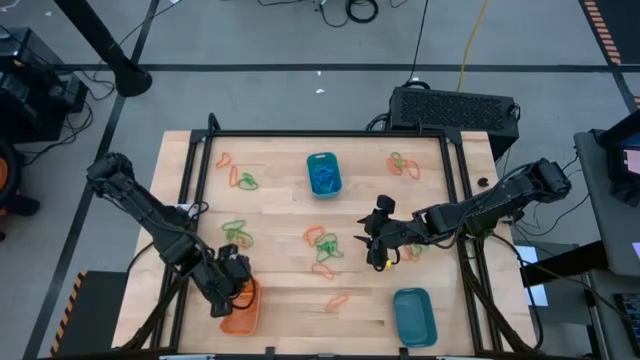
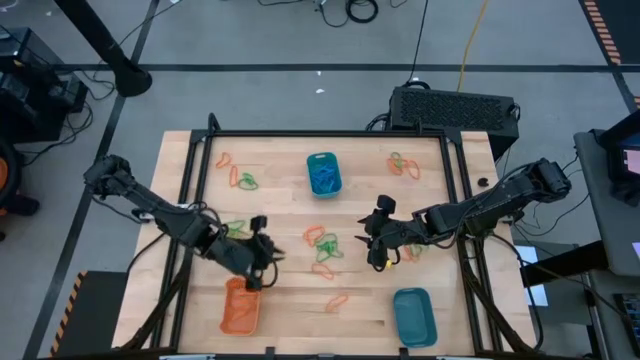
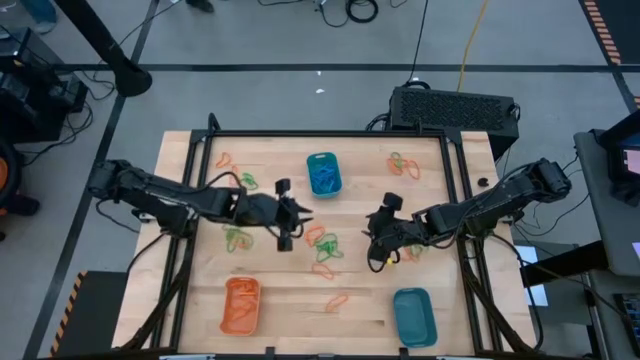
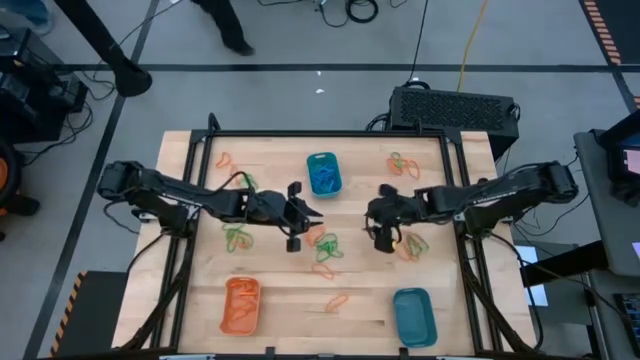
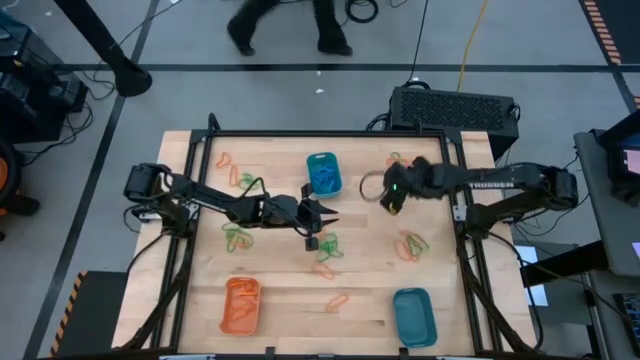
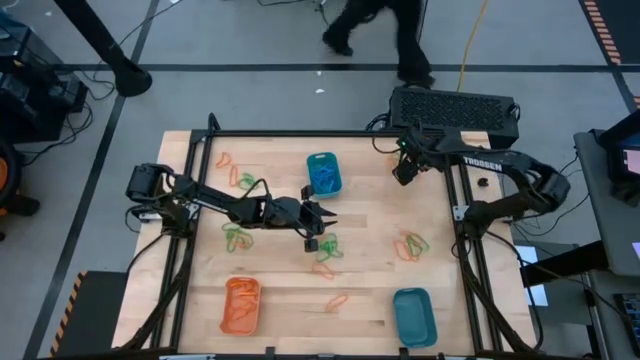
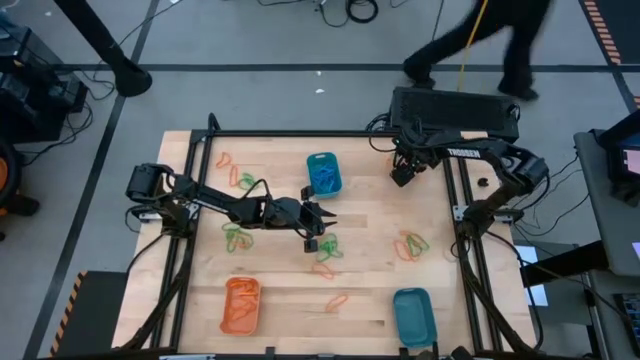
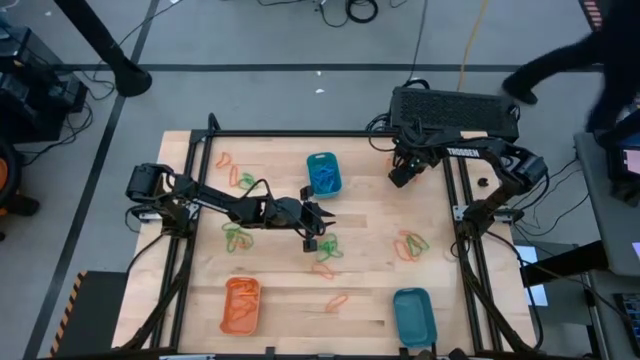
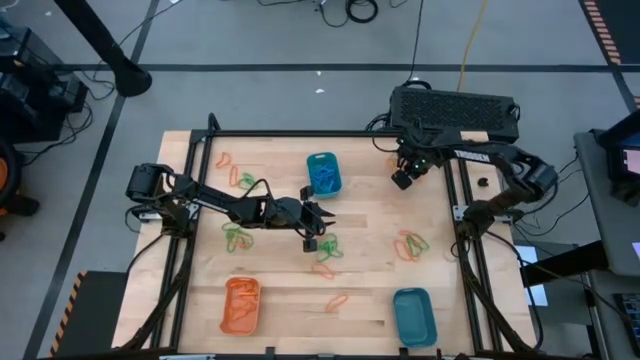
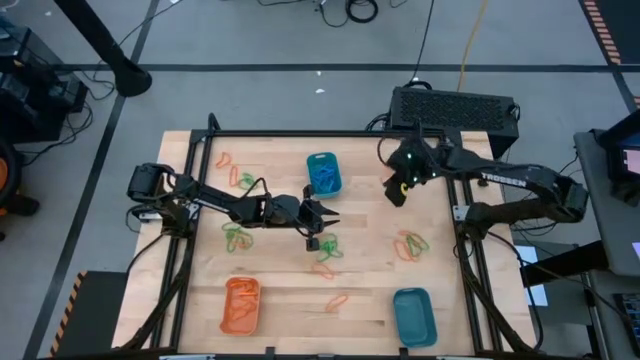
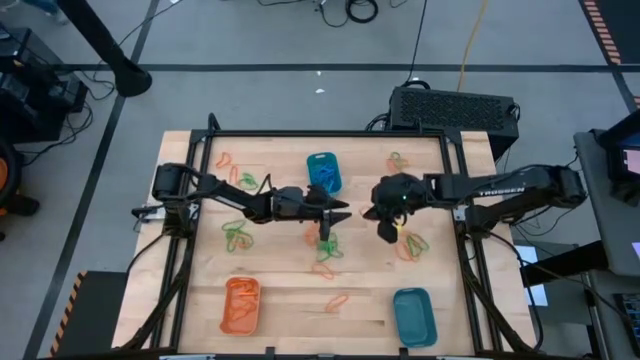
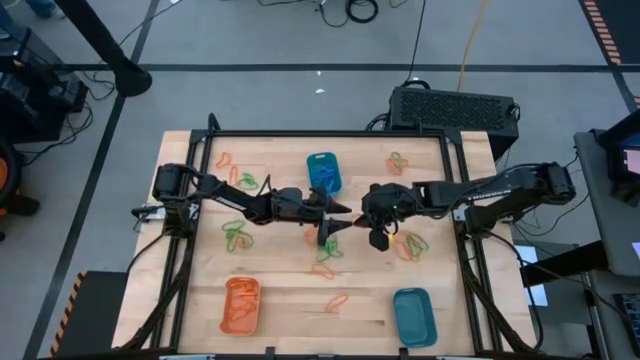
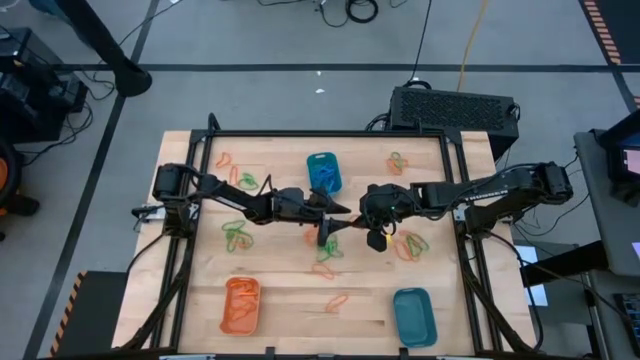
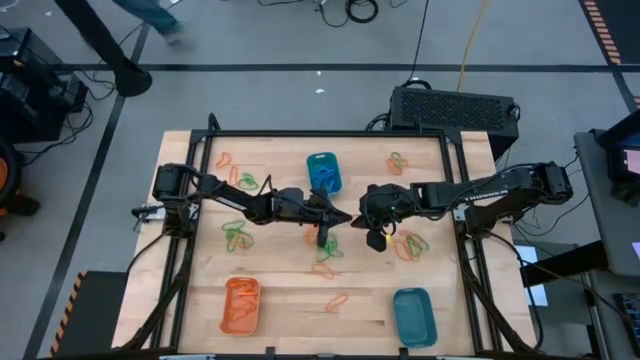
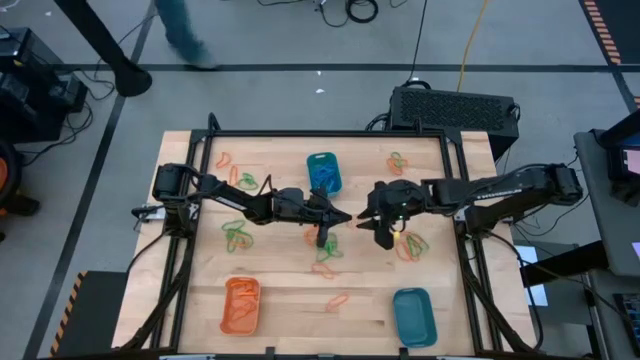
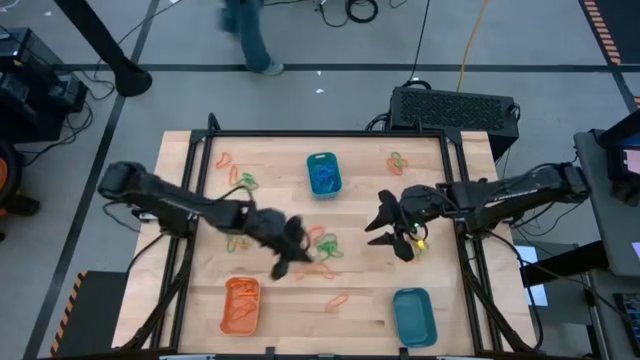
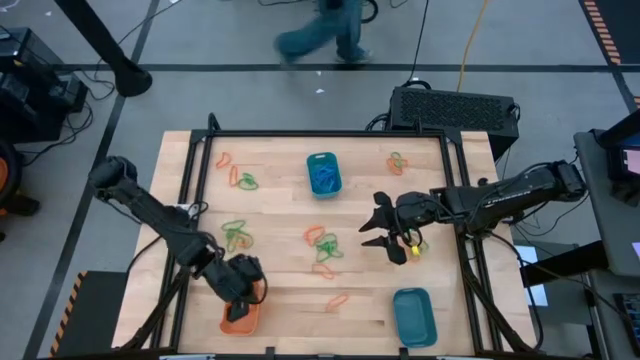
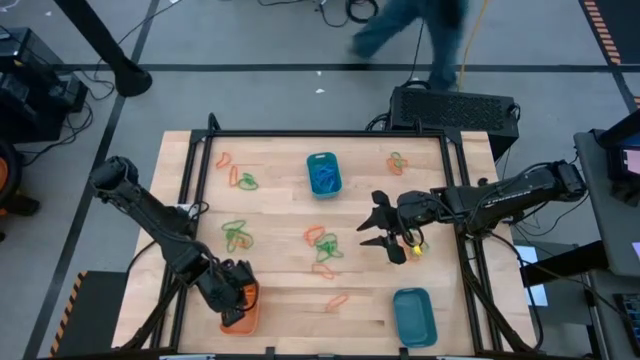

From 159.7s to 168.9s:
Task: Sort rubber bands into baskets
Put the orange rubber band into the orange bin

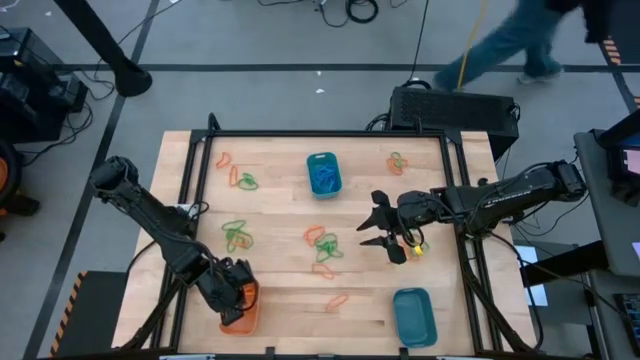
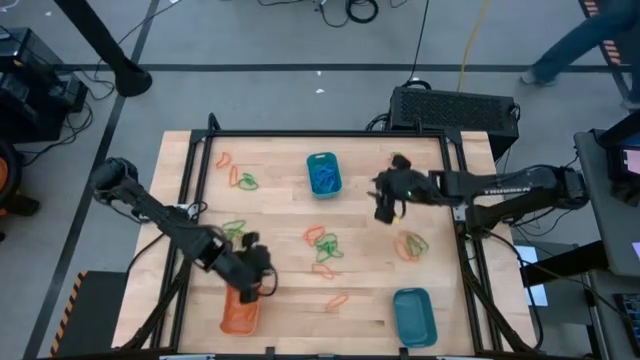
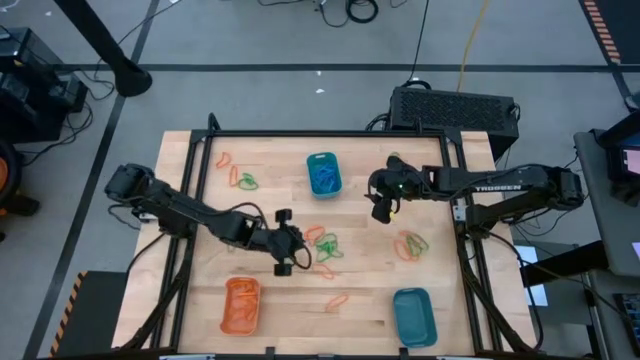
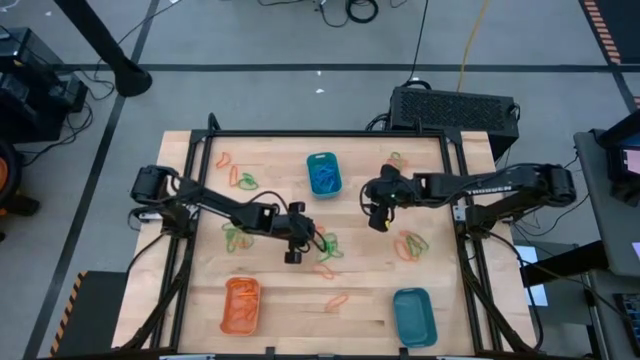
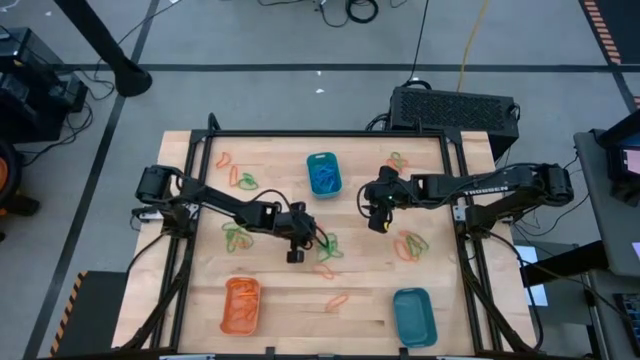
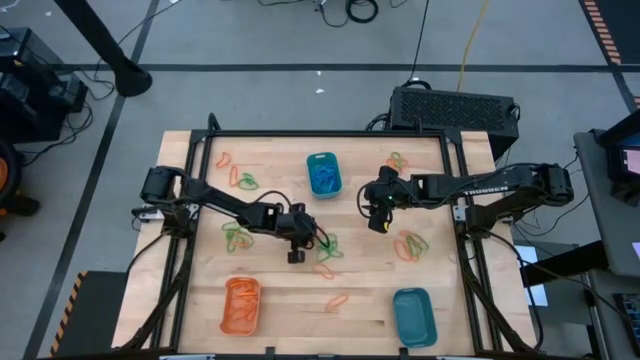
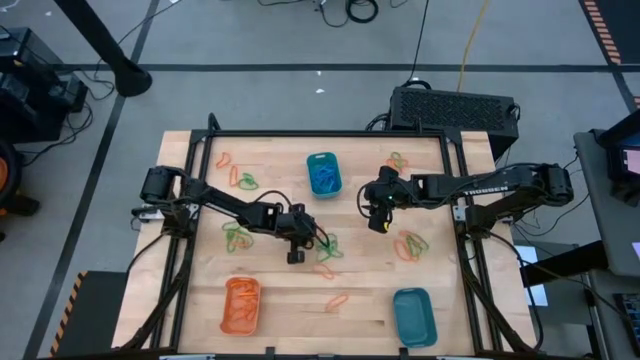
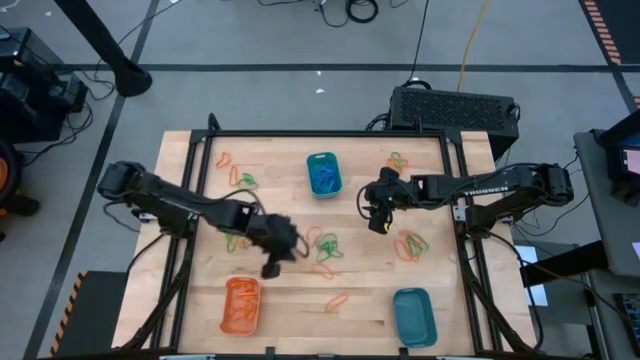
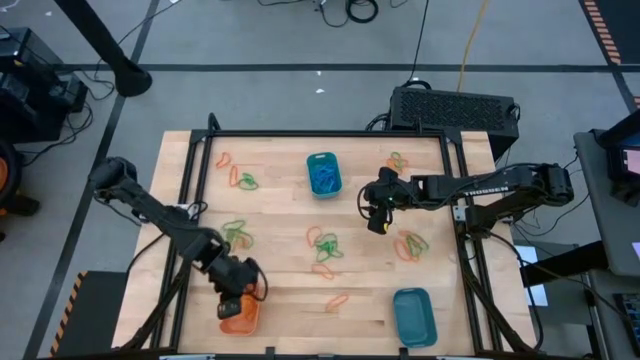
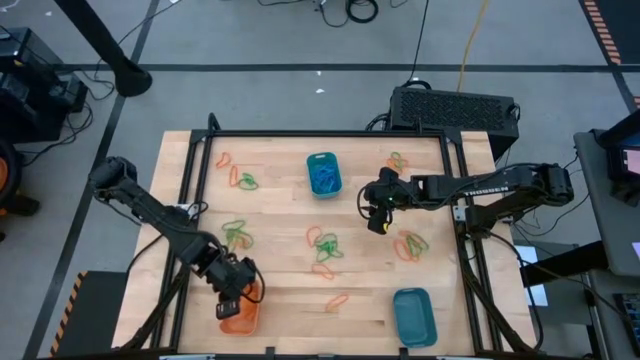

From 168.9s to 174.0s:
Put the orange rubber band into the orange bin

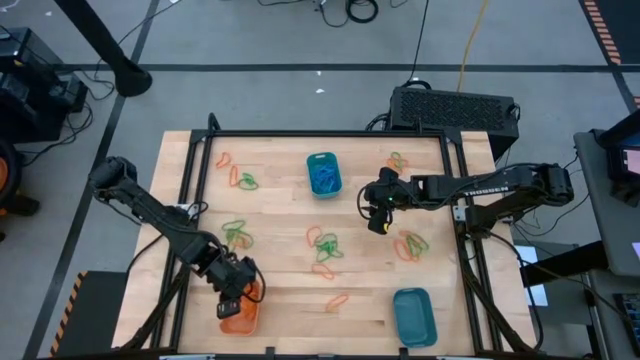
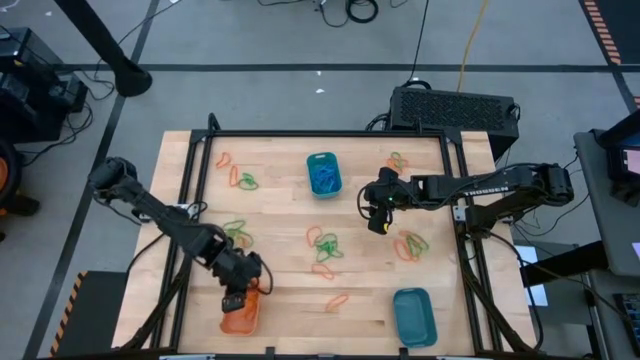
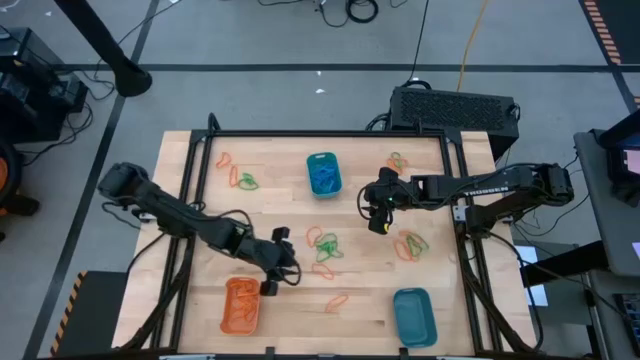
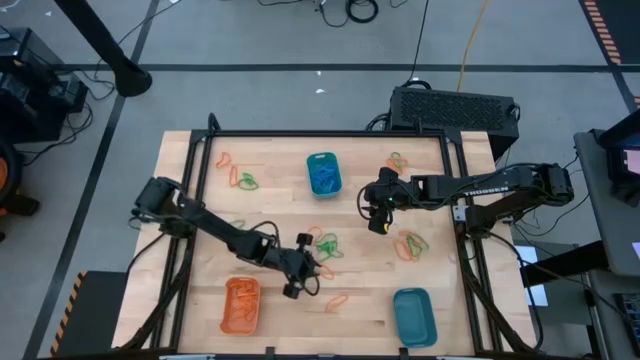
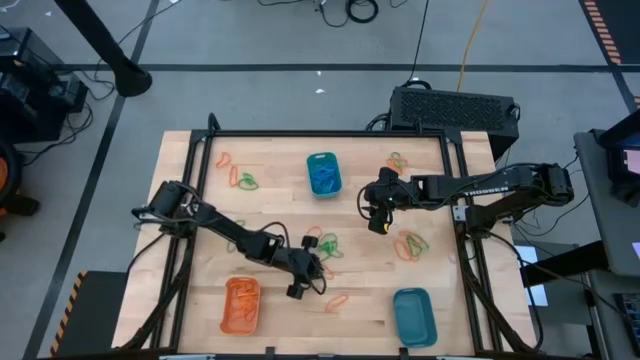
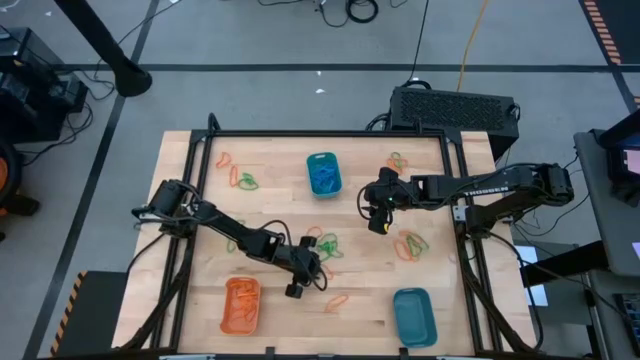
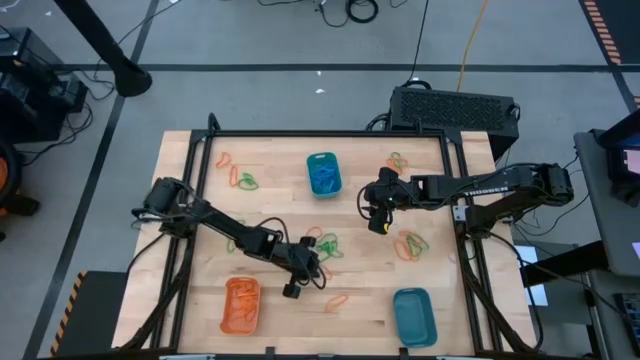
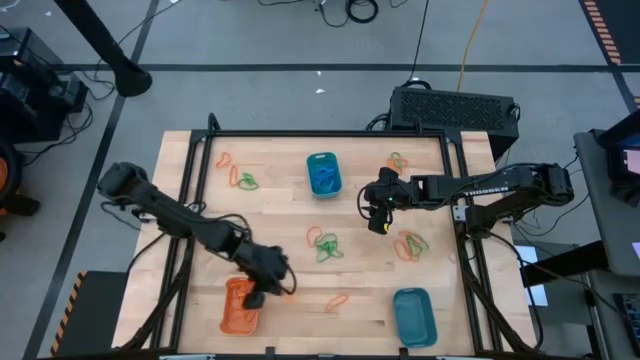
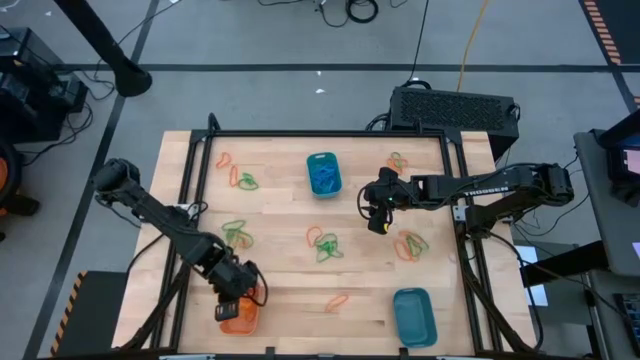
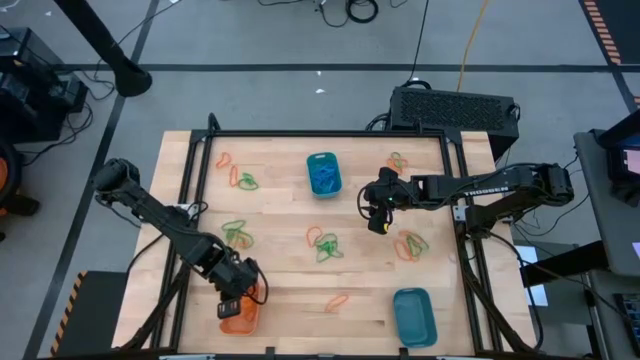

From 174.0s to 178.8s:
Put the orange rubber band into the orange bin

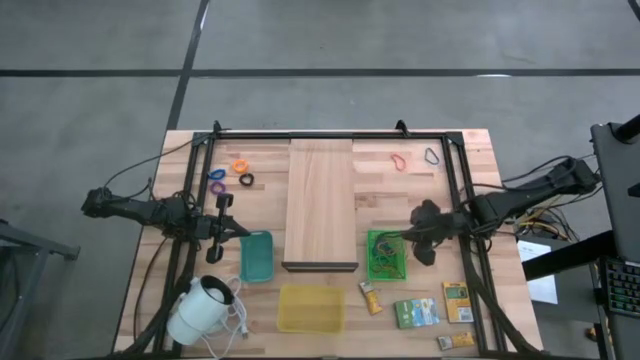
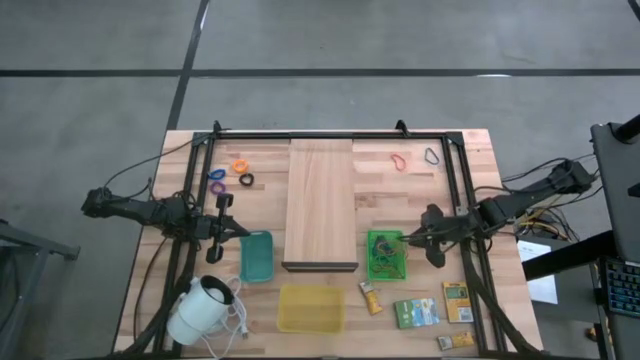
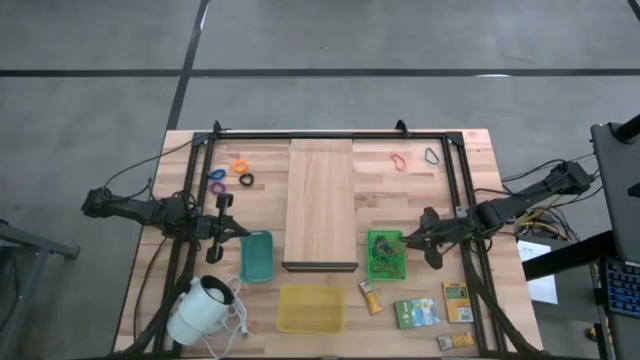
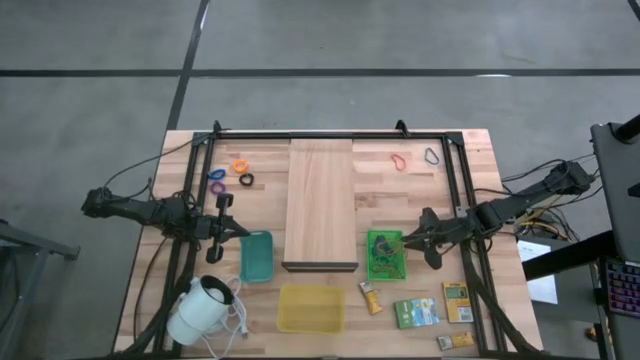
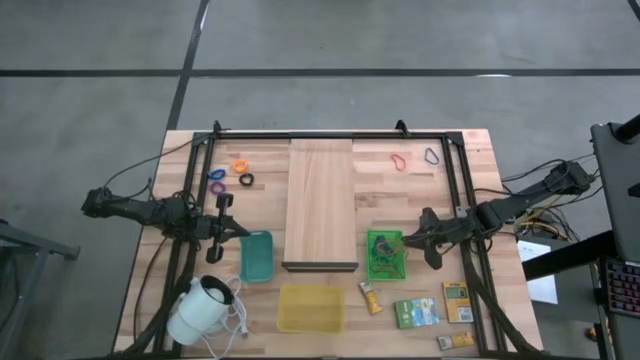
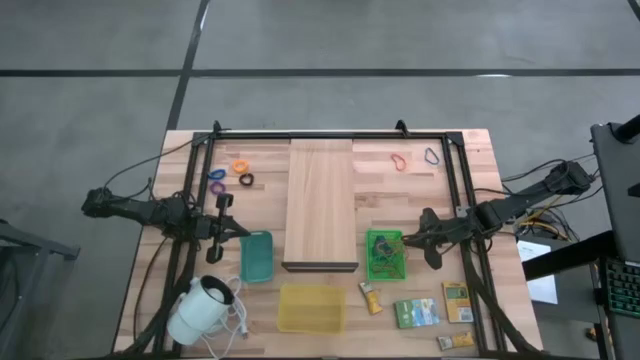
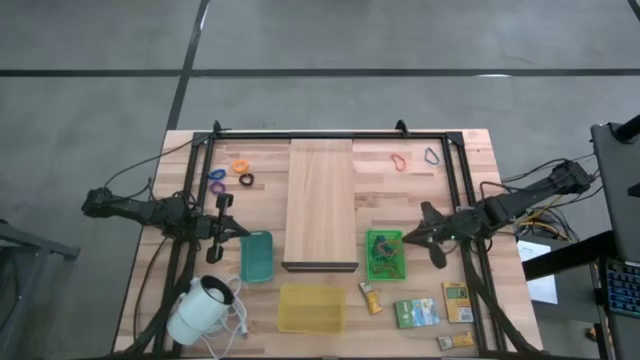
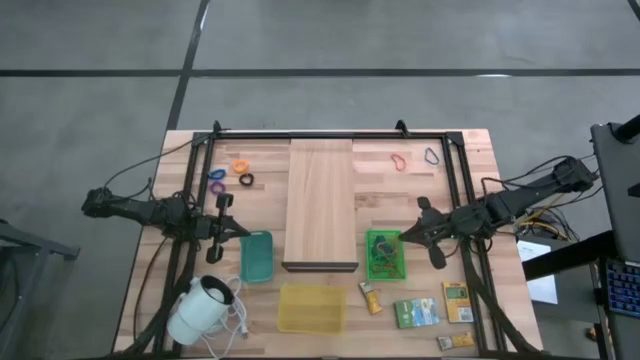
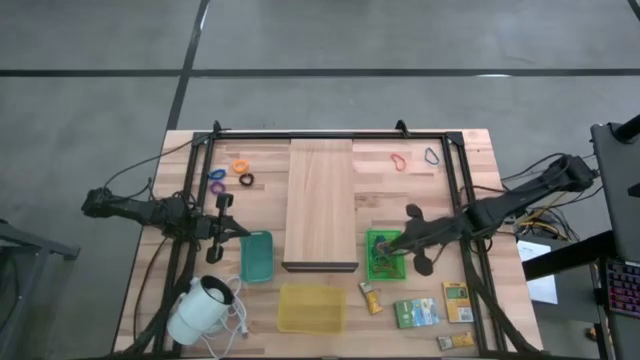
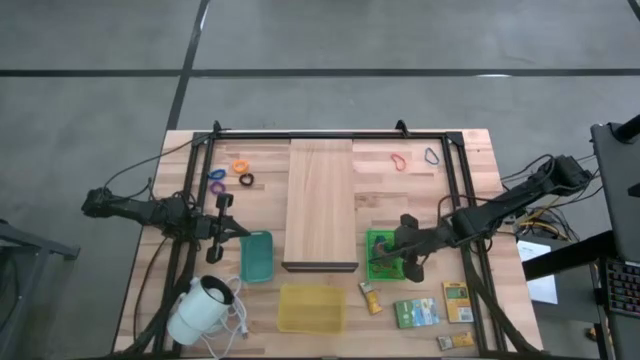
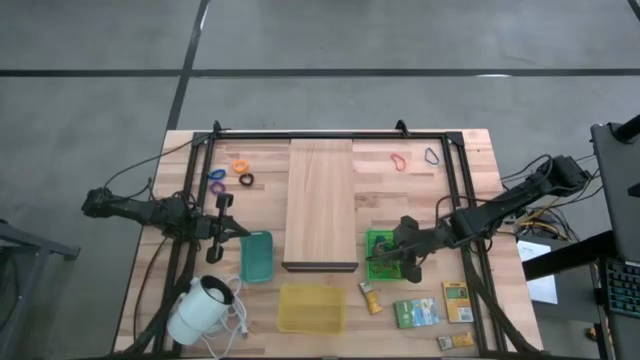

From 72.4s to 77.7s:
Task: Pick & Place Office Desk Supplies
Put the red rubber band into the green bin
